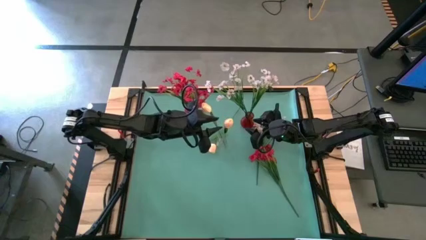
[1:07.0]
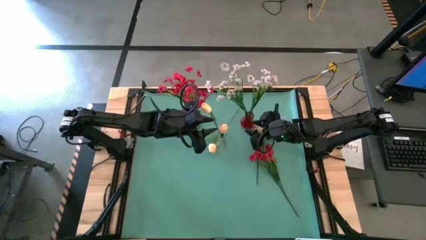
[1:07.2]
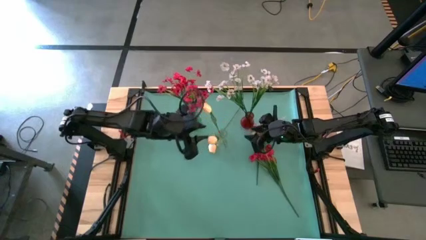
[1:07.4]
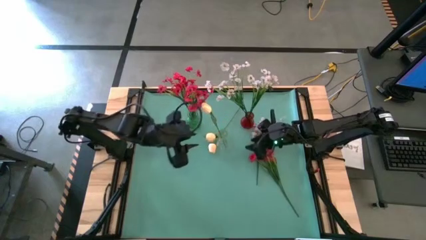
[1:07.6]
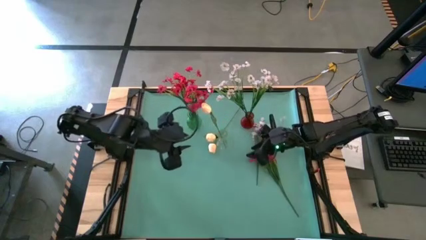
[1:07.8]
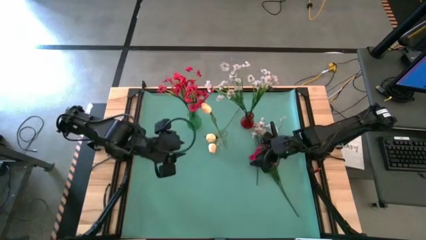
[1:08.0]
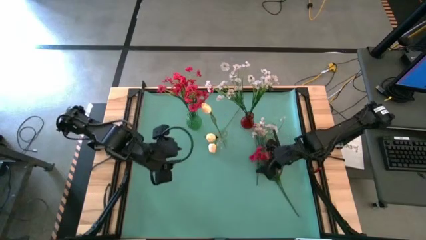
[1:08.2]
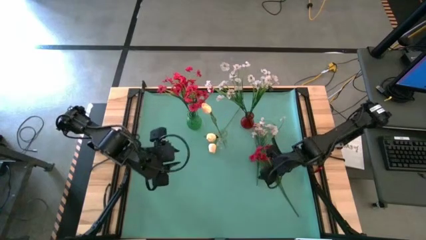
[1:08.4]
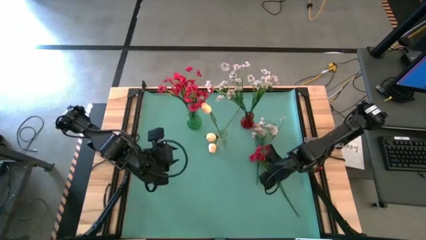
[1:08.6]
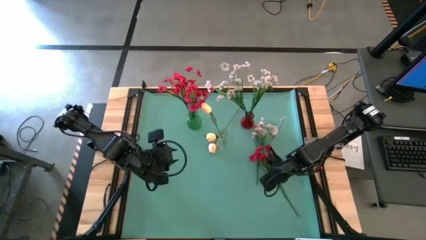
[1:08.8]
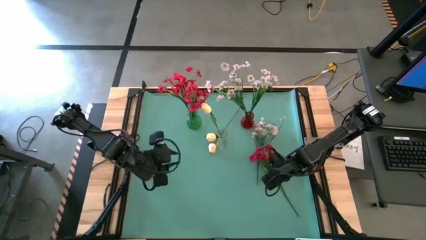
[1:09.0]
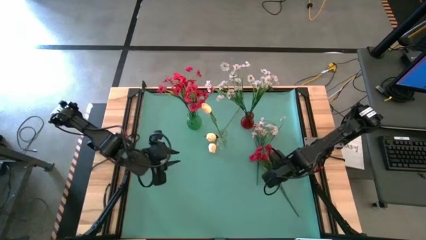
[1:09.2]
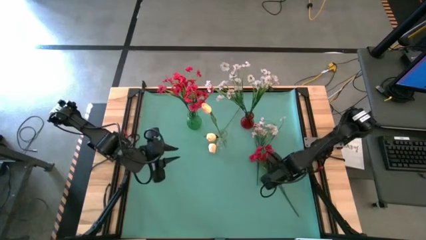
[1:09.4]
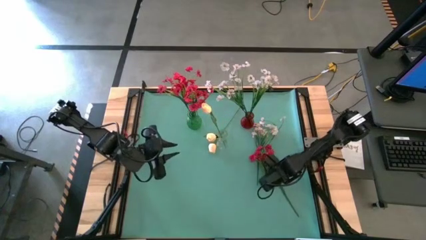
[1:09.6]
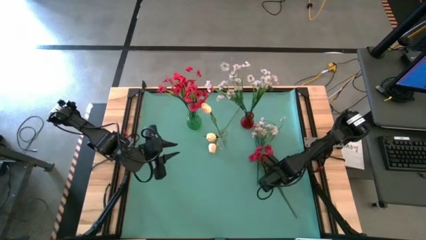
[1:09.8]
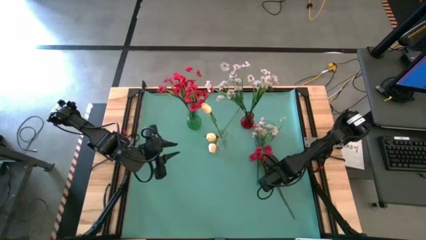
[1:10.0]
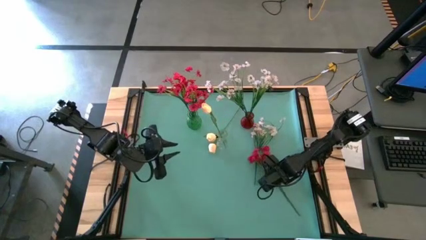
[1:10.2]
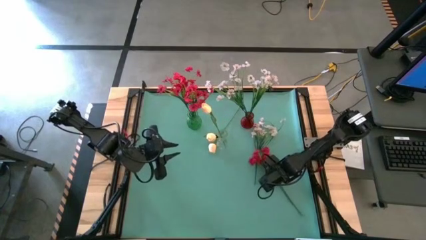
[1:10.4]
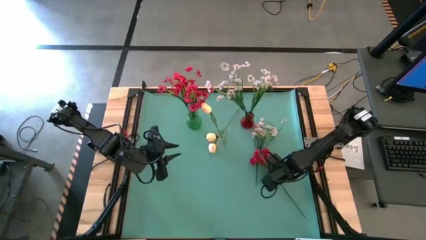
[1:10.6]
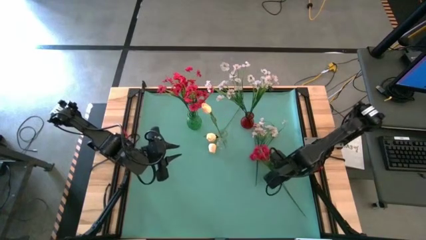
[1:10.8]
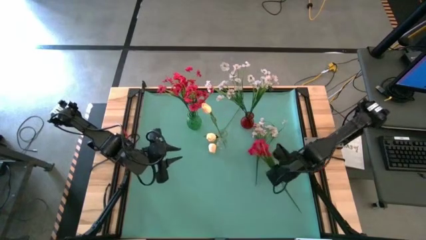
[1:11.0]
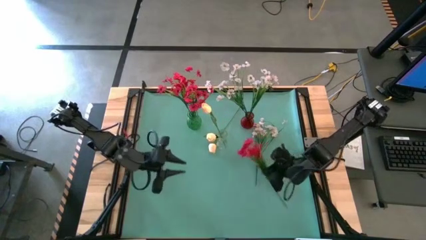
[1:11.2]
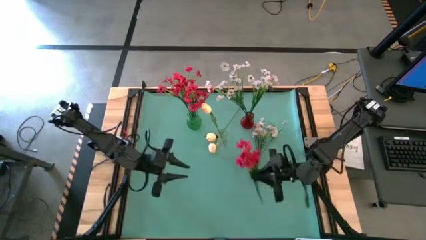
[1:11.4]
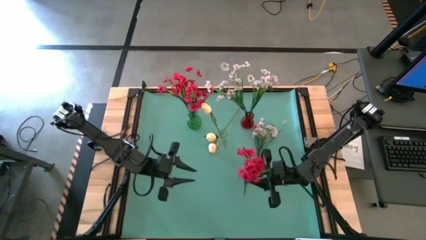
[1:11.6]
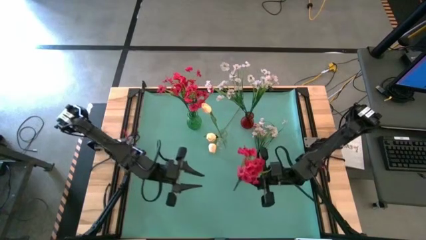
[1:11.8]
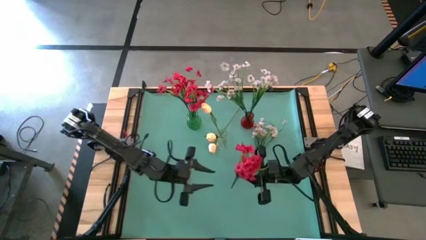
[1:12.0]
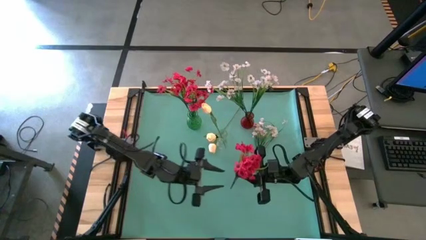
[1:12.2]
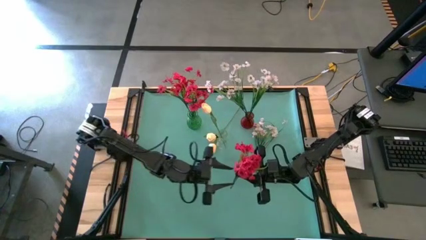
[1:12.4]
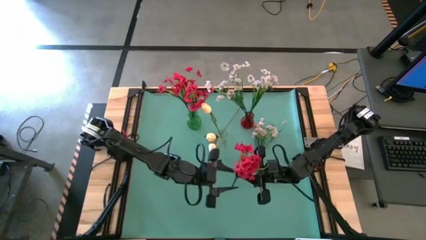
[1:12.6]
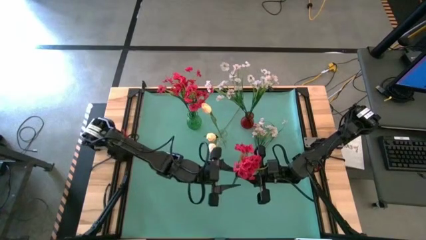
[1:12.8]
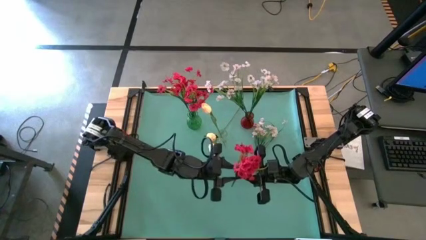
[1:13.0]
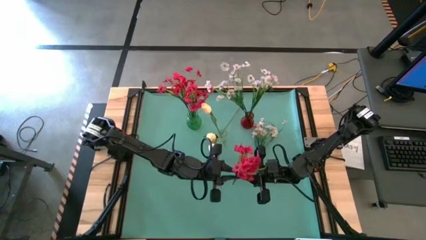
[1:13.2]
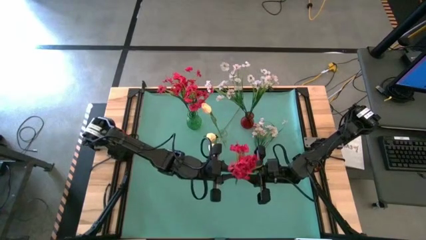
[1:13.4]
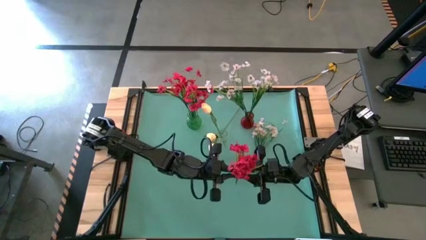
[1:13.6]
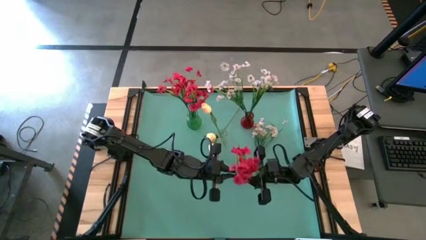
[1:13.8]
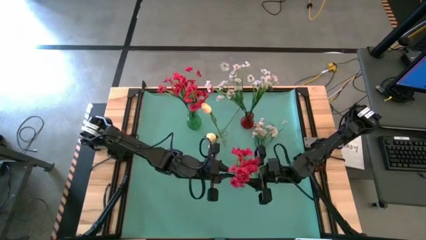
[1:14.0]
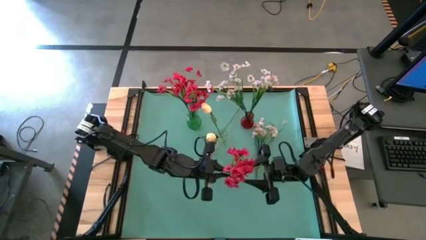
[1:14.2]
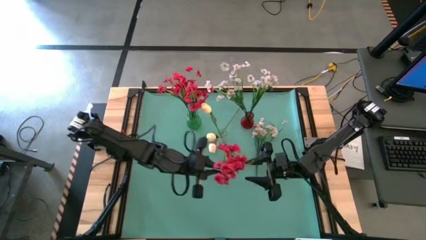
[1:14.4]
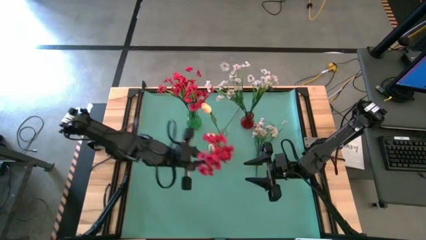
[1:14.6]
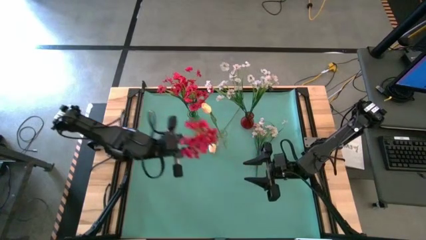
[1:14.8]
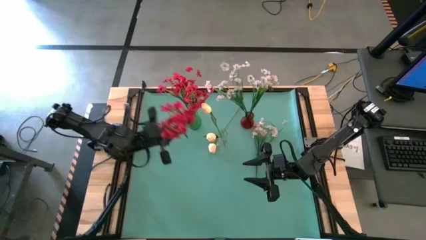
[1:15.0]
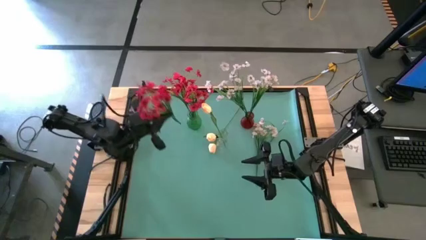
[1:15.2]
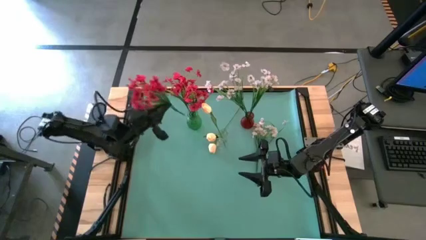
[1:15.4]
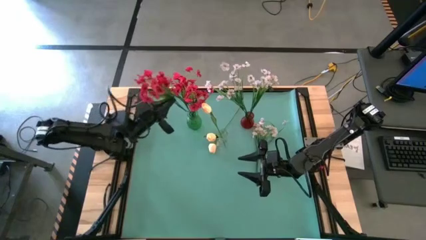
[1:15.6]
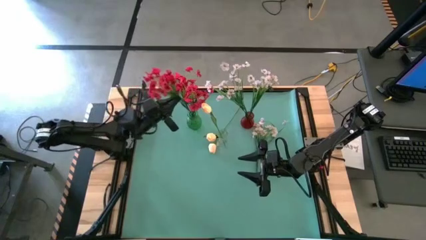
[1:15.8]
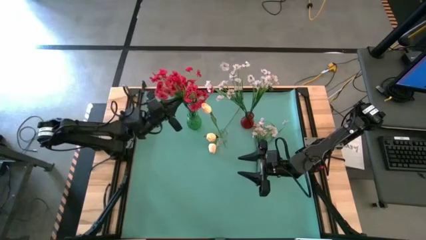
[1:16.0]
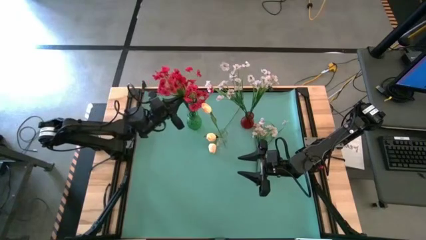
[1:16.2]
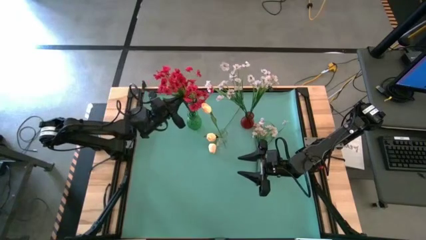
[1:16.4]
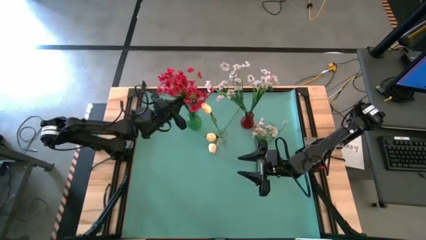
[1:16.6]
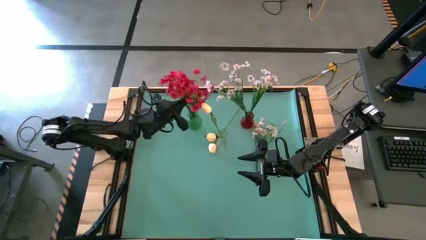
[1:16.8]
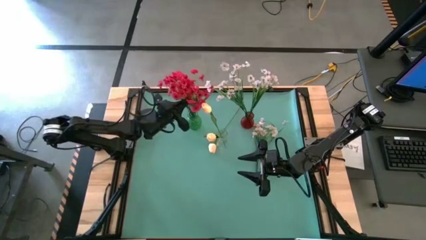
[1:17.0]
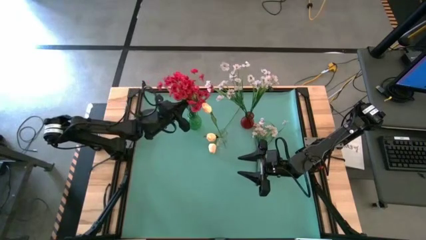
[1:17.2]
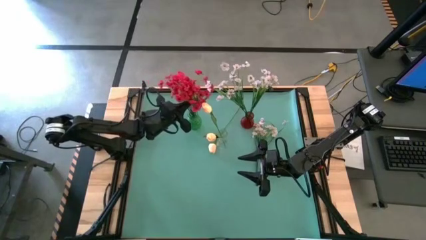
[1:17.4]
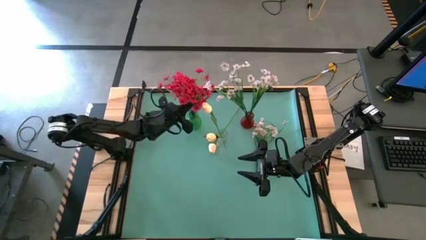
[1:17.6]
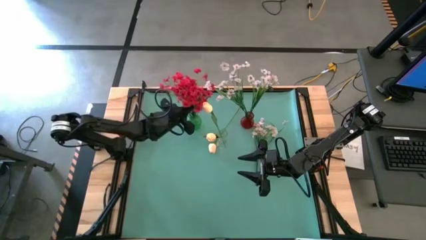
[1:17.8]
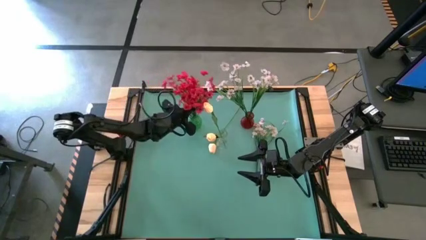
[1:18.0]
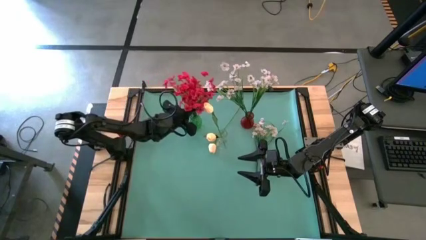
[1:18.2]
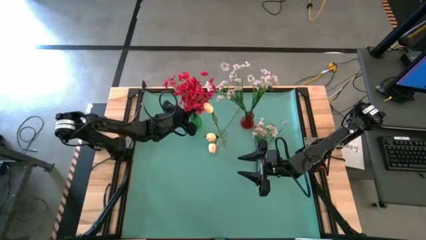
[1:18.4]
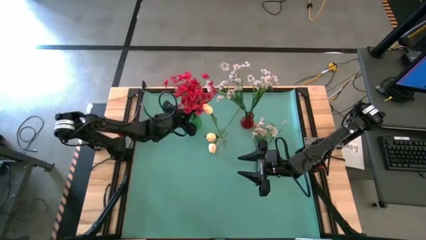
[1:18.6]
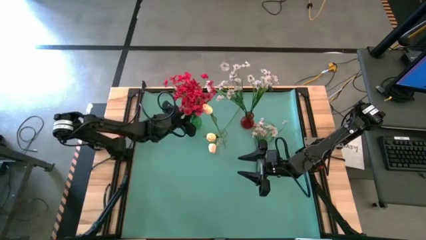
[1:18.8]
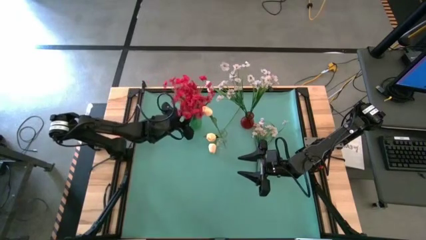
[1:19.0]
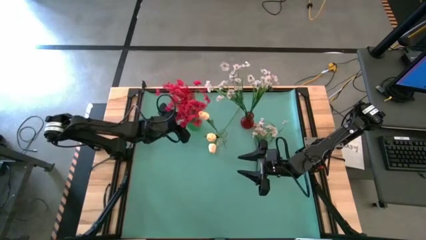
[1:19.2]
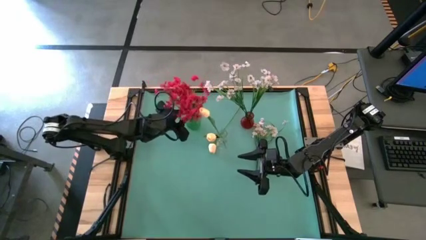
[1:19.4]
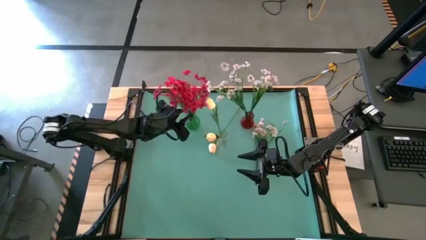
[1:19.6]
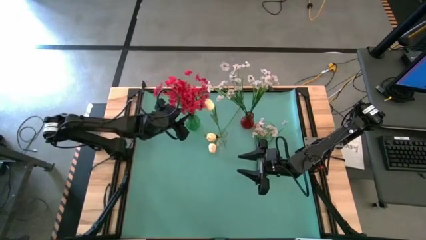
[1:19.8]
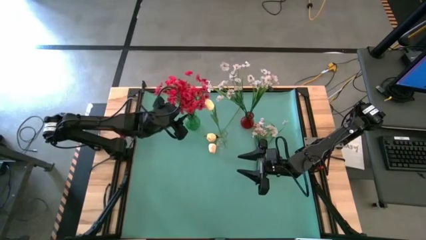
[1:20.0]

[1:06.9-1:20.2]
Task: Sort flowers into vase by color
Put the red flower into the green vase

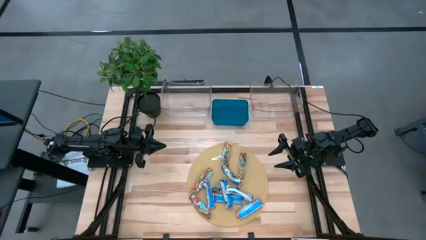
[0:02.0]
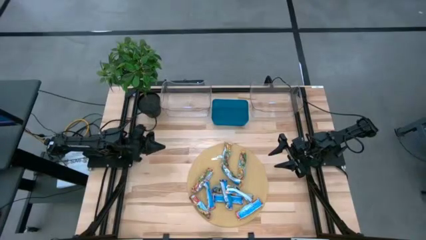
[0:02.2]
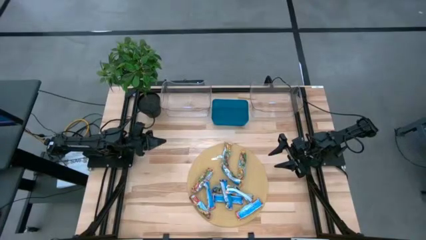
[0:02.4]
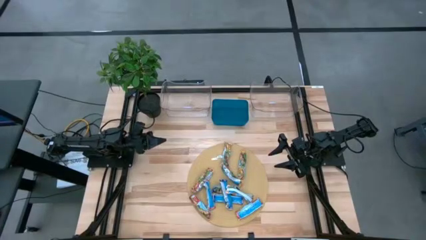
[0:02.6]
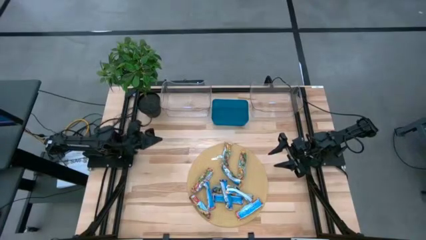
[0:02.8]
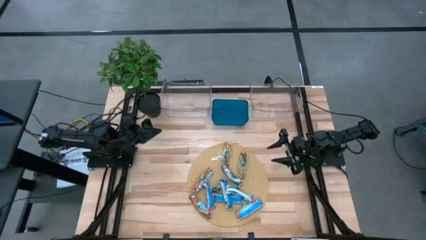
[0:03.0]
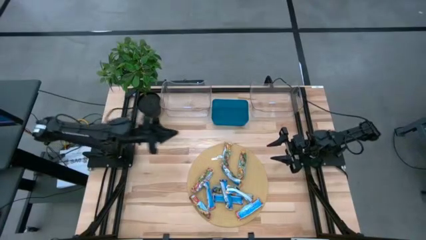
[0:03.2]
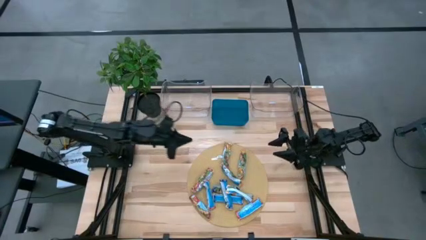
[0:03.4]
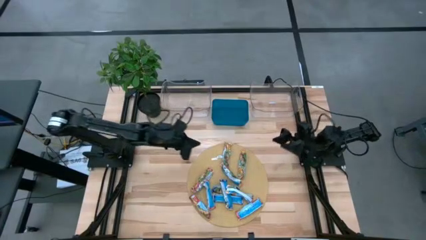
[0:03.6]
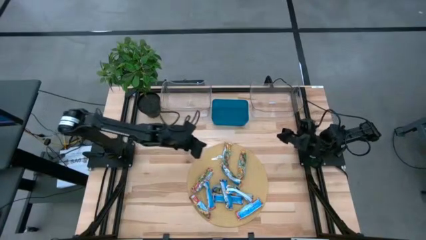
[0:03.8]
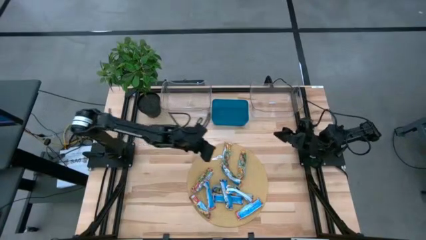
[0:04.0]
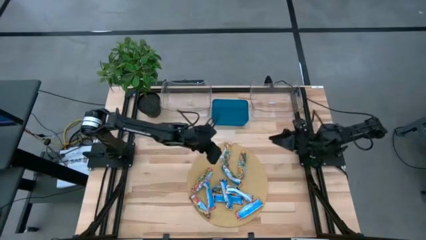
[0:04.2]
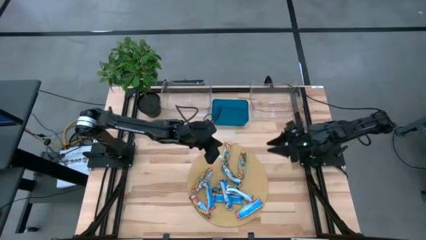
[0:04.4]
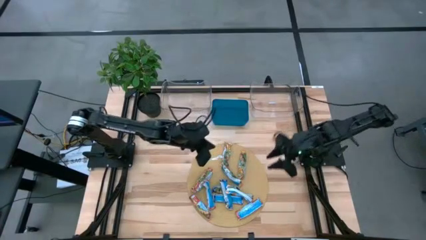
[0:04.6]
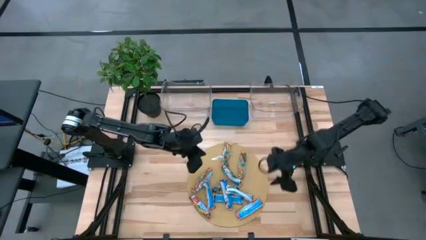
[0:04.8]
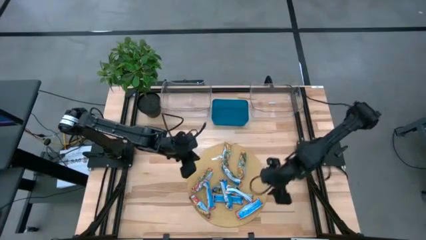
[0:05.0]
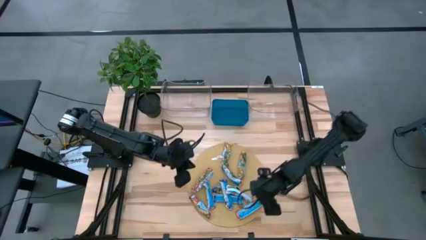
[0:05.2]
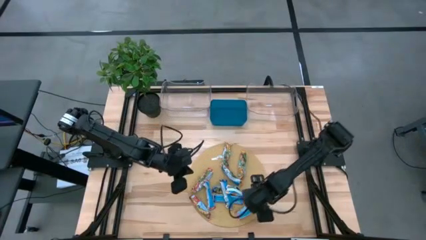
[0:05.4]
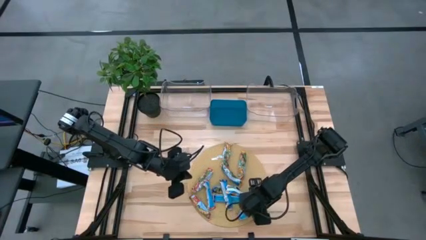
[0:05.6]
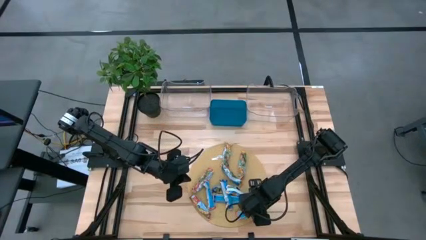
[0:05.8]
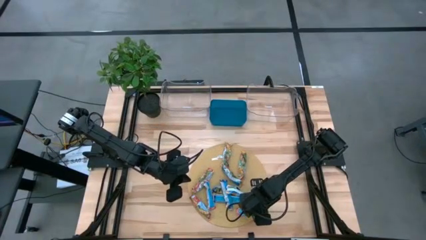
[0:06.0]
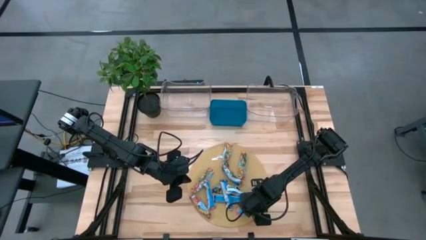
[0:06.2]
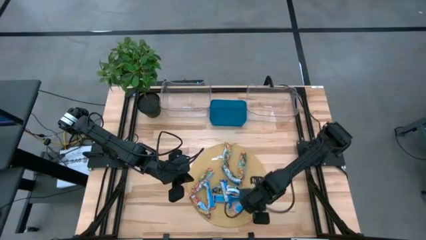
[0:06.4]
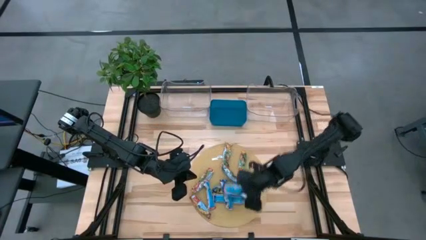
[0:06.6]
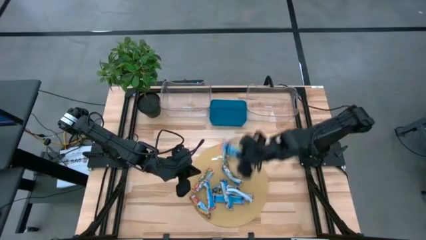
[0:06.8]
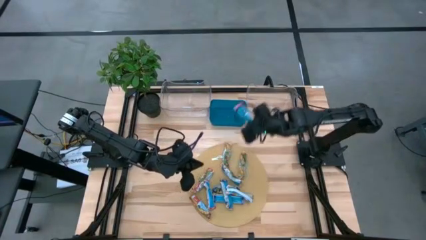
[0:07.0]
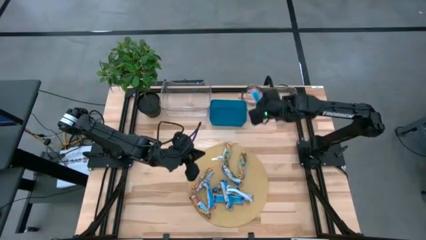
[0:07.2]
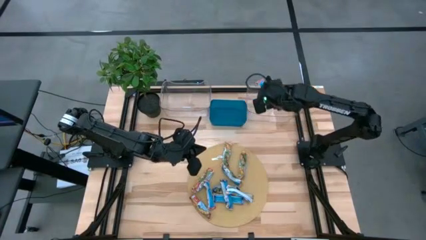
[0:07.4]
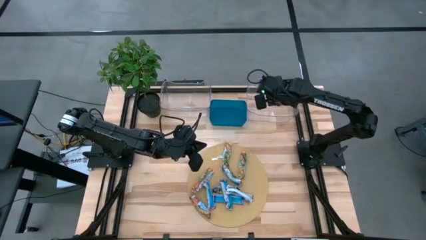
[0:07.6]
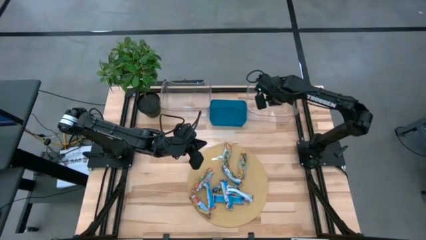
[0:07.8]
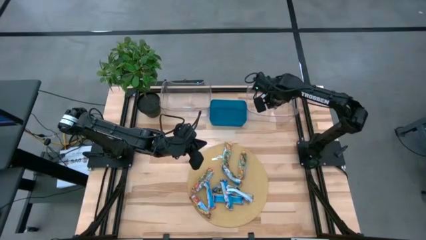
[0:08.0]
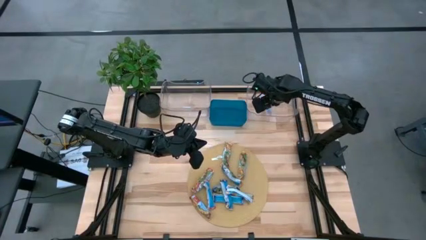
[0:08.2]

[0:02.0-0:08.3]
Task: Pick and place Granola Bars by type
Put the red granola bar into the right transparent bin
